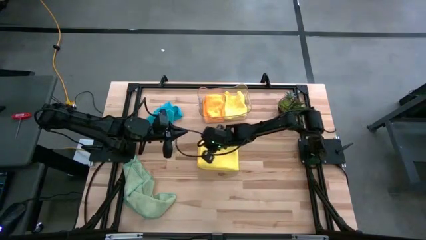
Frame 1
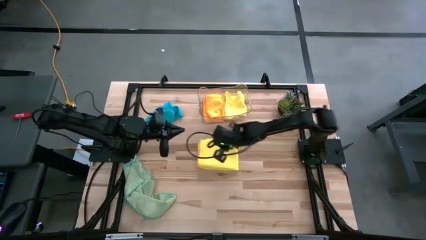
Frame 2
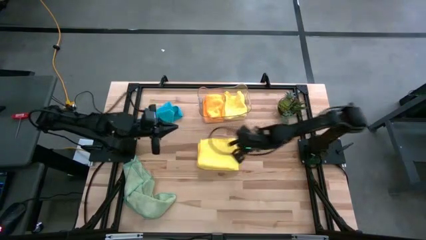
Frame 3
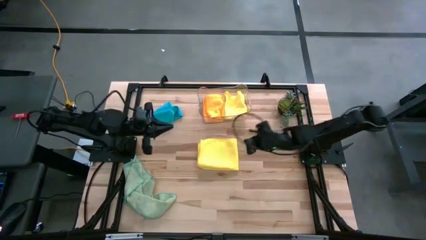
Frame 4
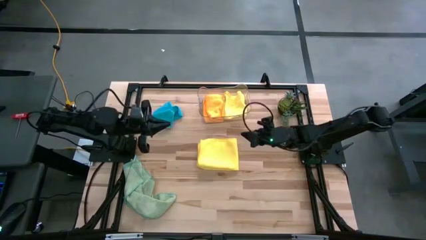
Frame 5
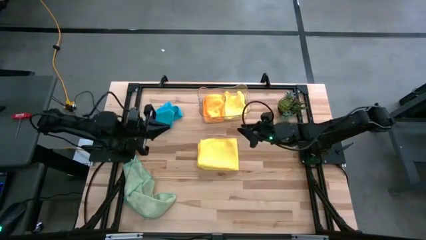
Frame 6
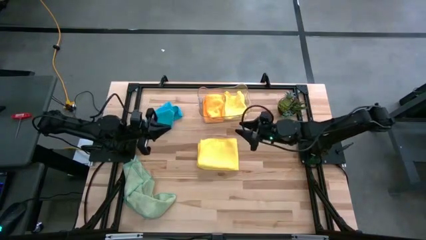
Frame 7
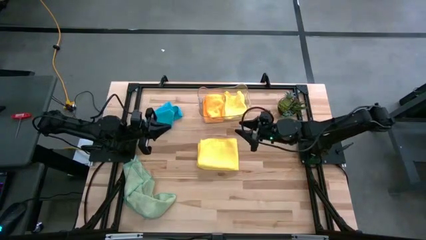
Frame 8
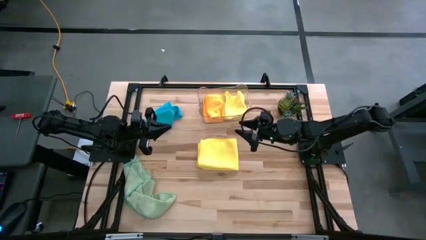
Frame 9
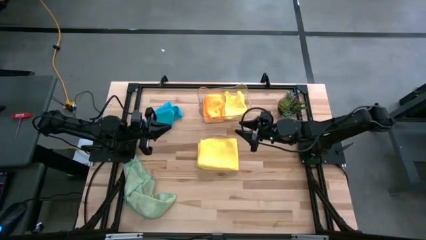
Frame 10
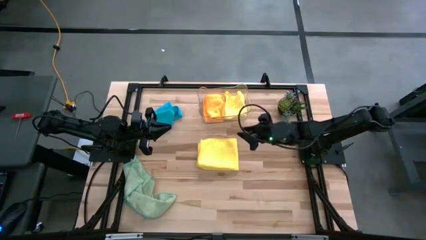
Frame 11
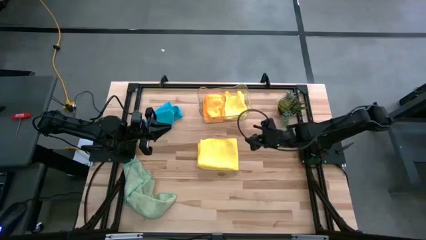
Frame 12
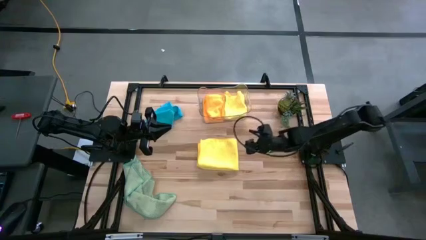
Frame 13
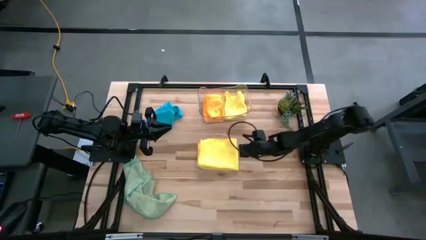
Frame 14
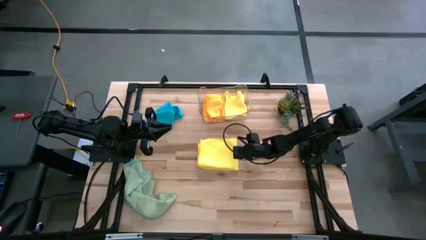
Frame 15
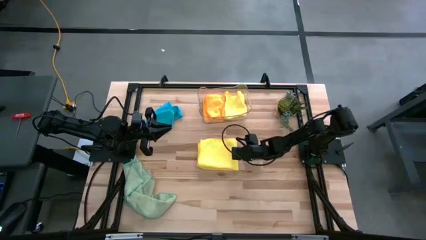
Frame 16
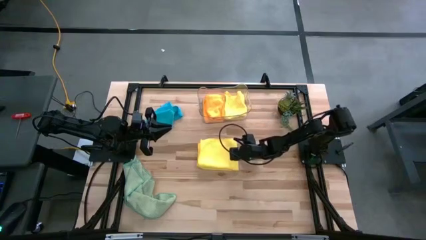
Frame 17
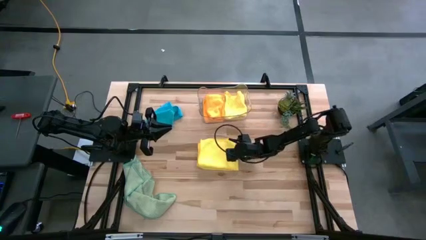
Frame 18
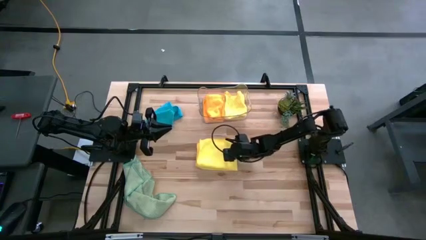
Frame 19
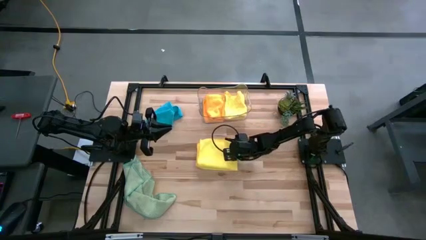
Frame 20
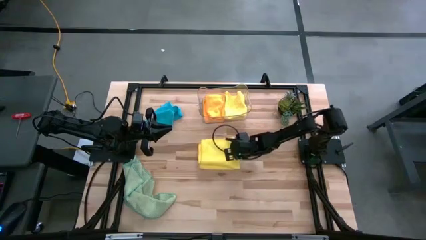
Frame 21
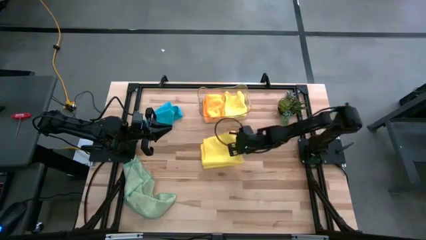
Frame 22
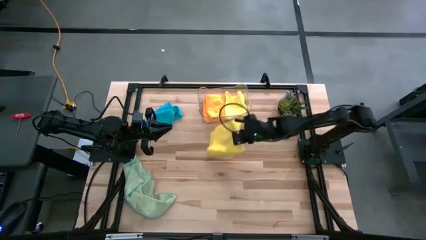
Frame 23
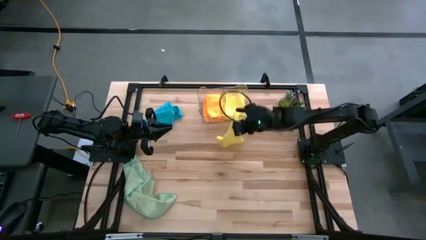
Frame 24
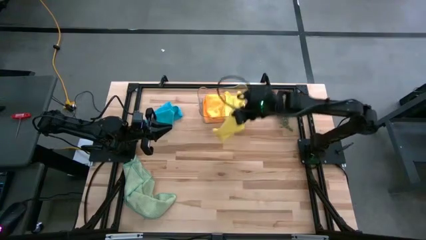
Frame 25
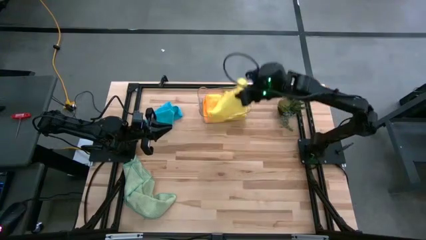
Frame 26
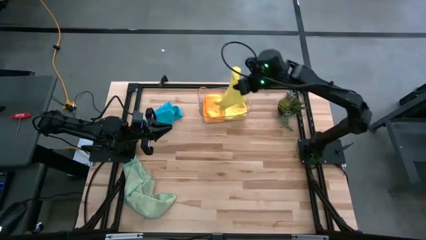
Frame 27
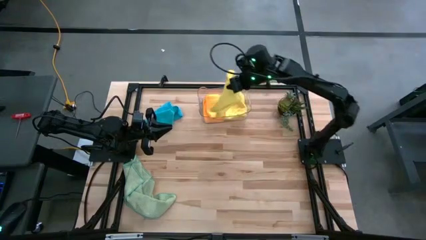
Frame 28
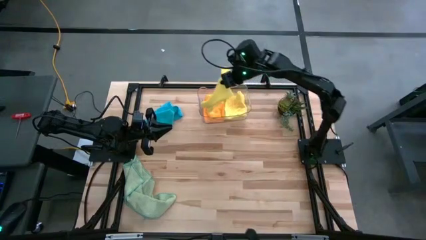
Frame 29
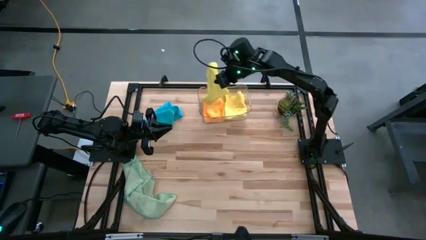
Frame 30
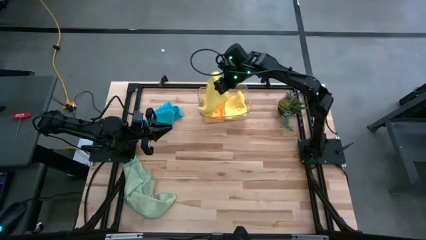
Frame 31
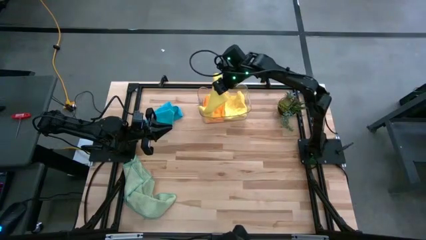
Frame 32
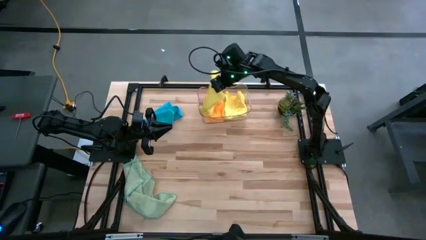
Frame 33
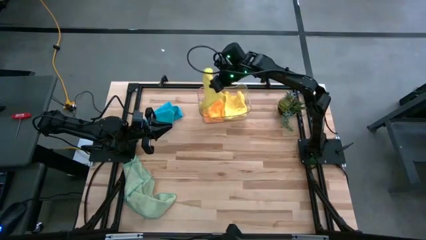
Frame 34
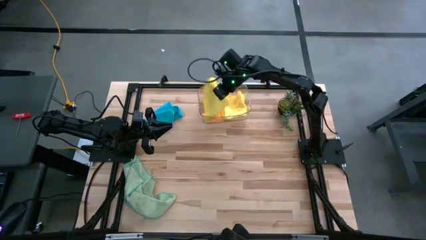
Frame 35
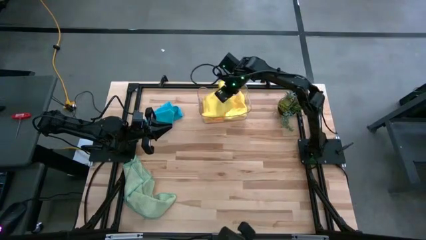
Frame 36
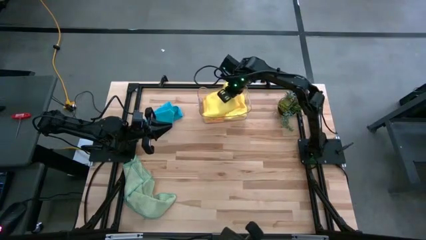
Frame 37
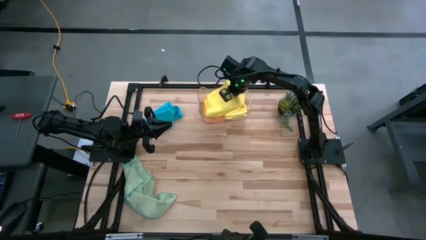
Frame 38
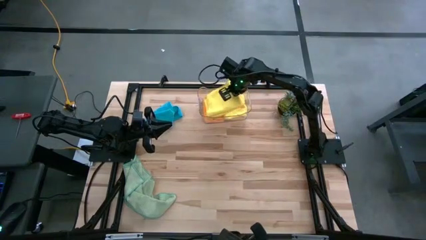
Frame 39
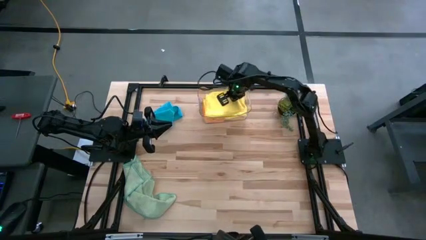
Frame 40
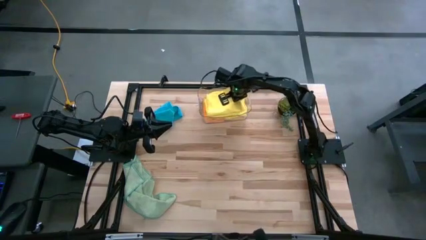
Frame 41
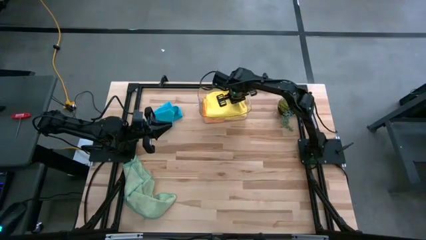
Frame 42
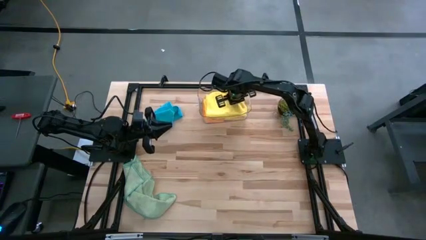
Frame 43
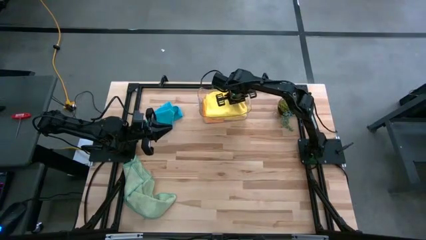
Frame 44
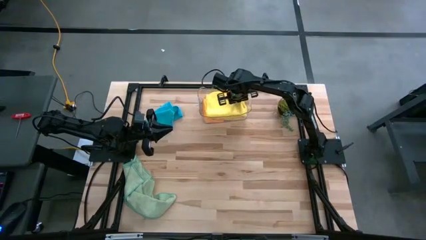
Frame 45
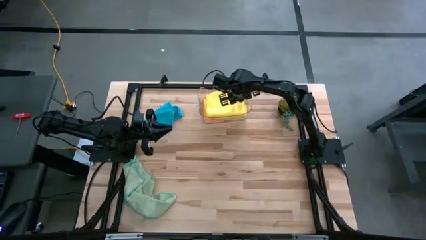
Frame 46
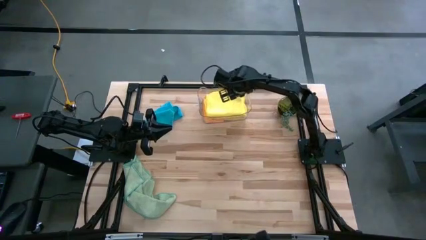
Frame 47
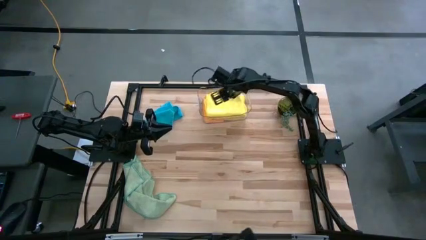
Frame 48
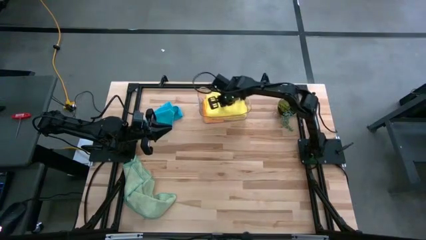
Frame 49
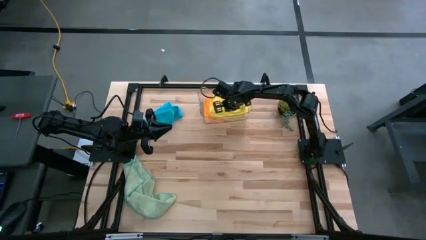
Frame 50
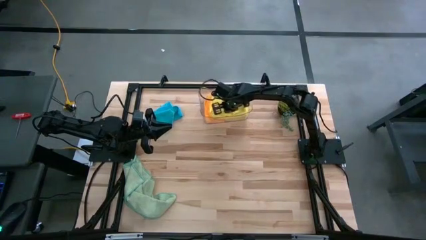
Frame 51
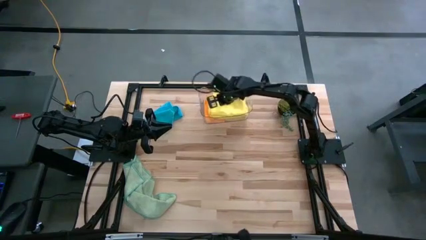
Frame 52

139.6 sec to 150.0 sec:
Task: Fold microfiber towels
Put the yellow microfiber towel into the transparent bin

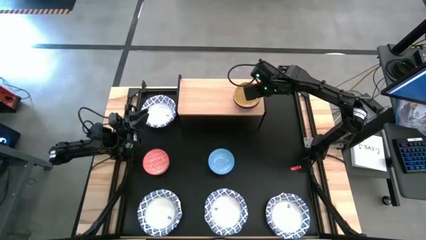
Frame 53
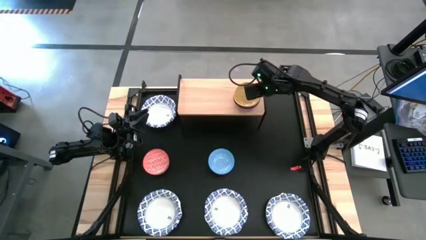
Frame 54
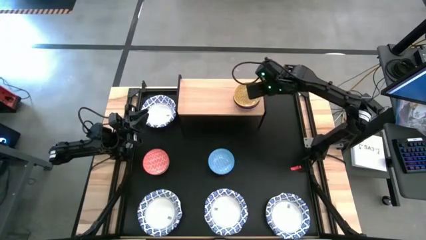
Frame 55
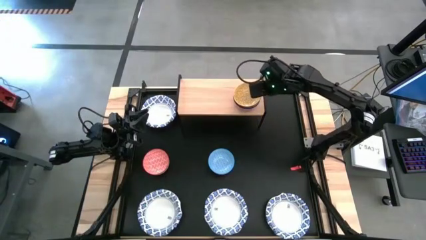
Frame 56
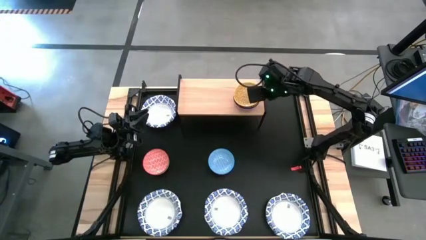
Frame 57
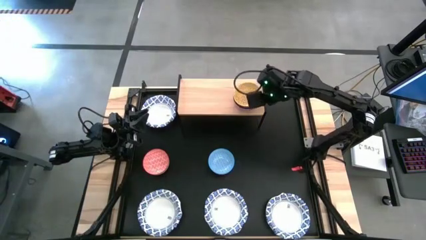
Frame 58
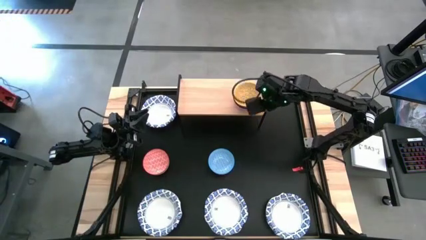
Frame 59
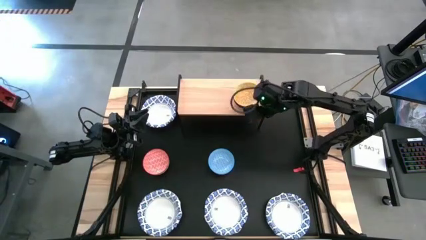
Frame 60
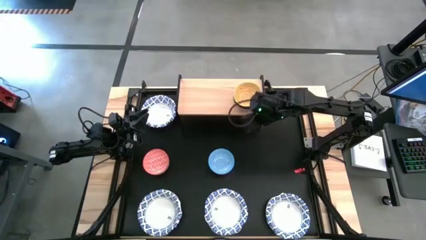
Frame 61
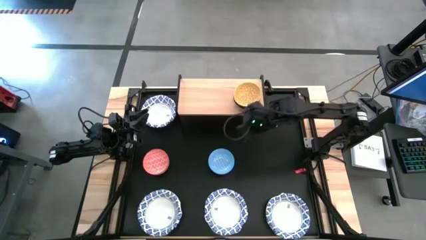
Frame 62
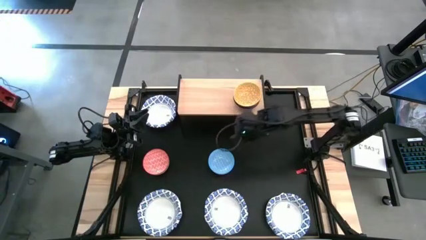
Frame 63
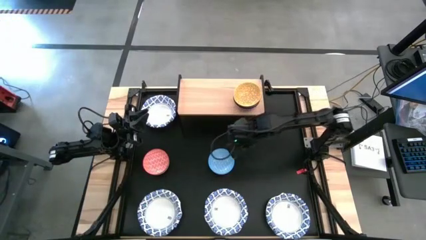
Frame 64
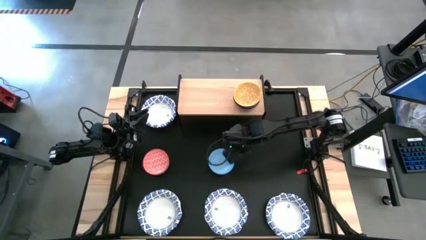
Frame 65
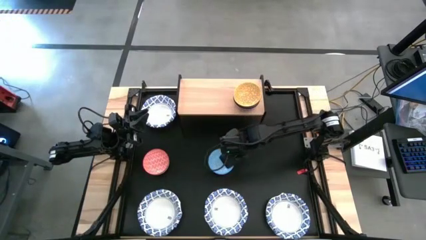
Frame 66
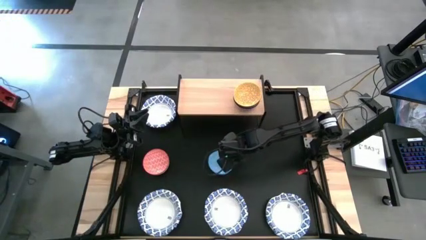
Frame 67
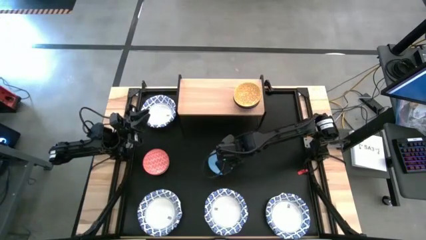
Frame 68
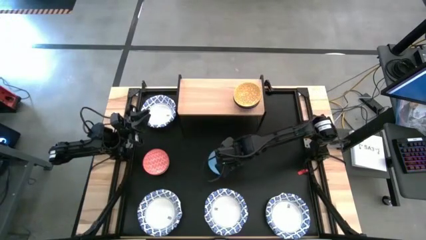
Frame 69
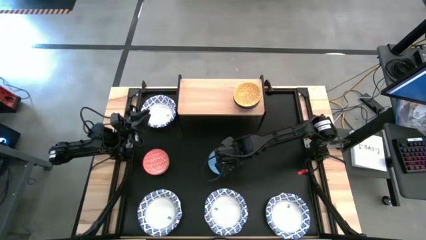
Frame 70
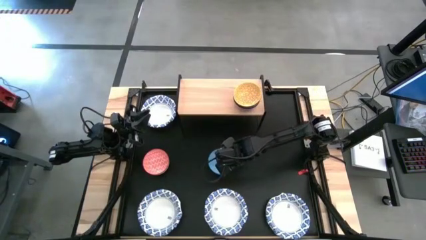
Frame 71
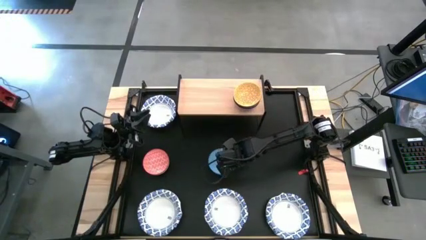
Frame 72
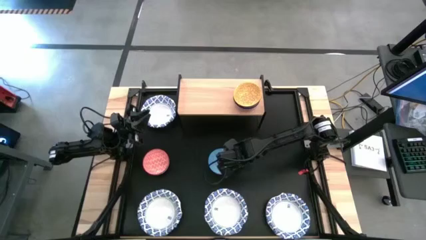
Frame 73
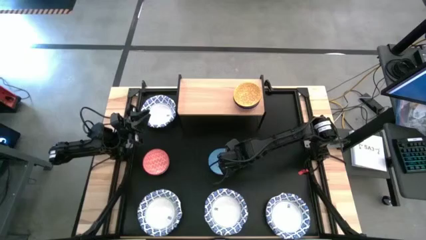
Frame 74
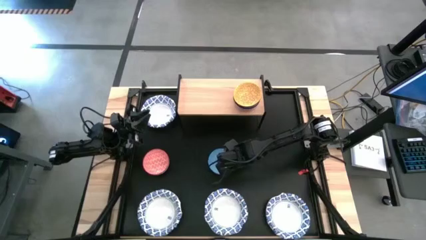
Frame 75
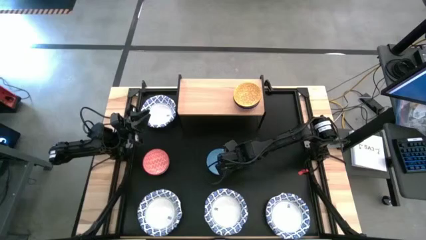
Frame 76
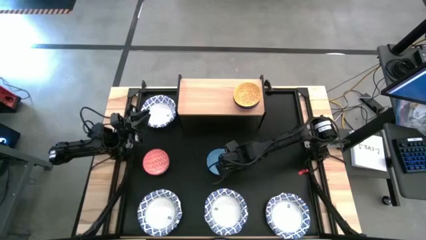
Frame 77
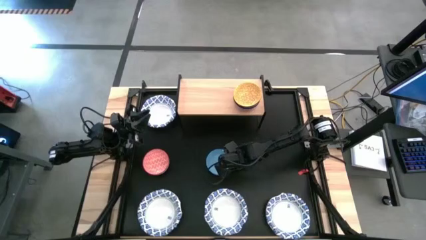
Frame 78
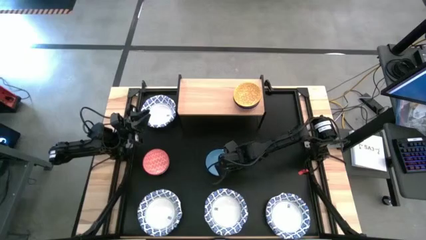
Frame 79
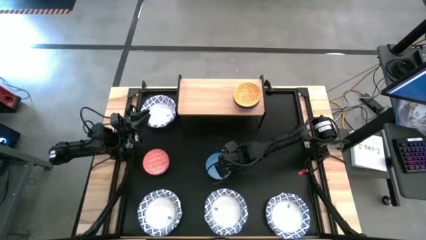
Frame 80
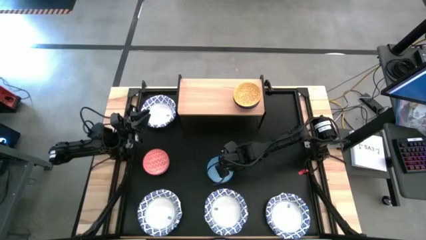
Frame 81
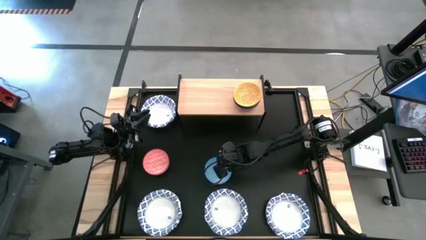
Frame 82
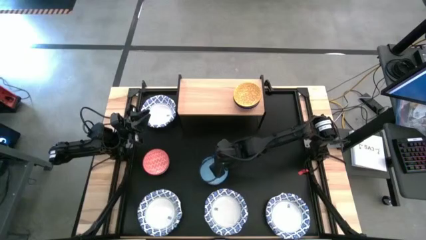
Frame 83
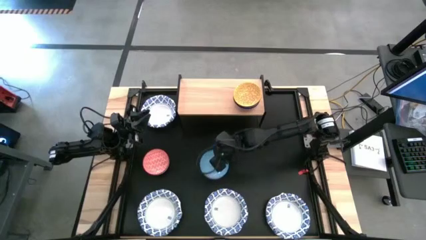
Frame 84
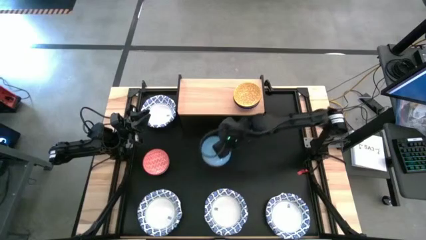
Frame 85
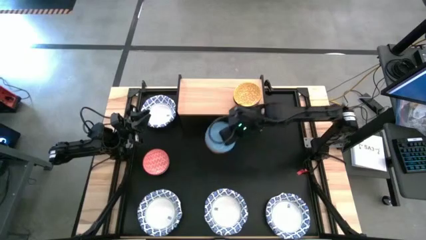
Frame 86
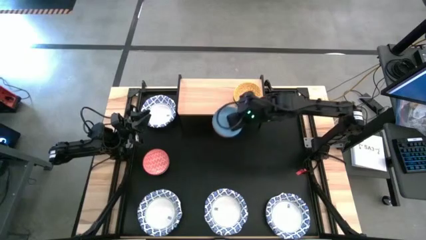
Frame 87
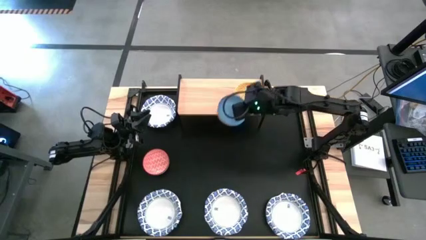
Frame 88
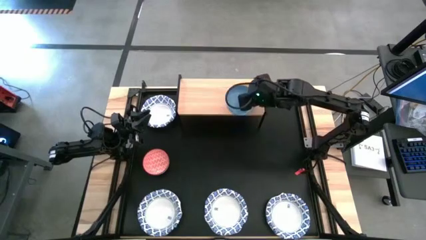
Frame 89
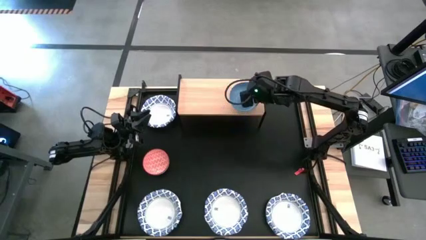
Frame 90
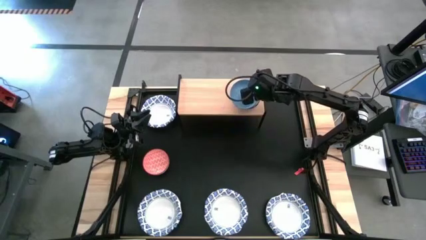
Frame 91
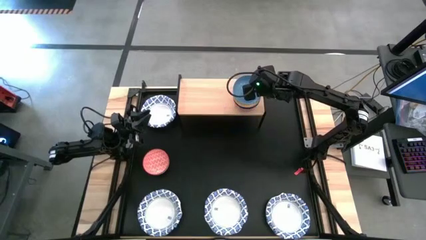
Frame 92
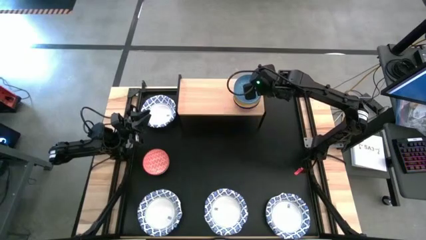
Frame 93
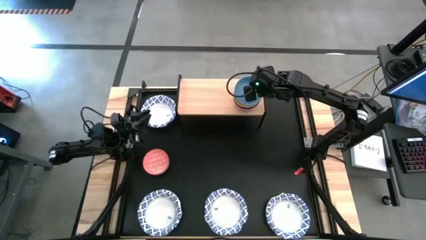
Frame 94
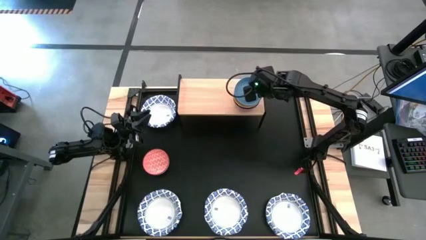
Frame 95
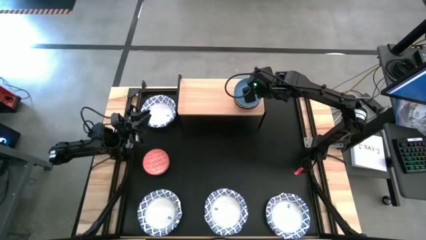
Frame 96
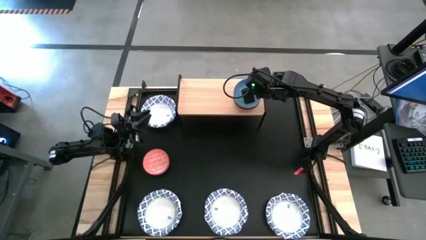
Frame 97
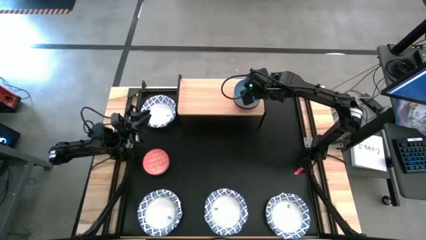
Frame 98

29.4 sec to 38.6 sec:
Task: Place and stack bowls onto a shelf
Stack the light blue bowl on top of the yellow stacked bowls on the shelf
